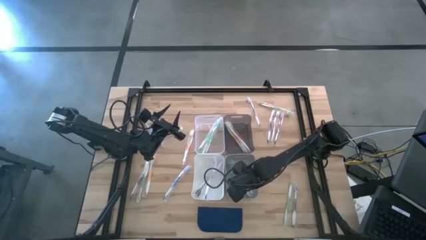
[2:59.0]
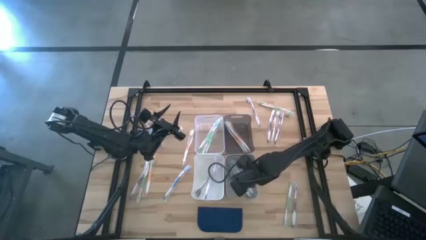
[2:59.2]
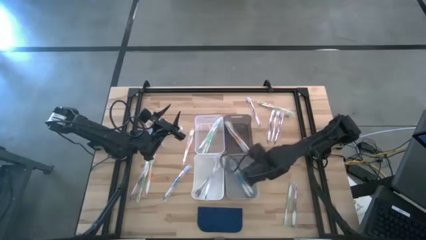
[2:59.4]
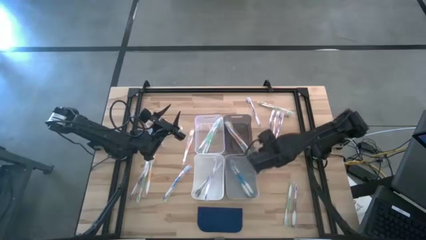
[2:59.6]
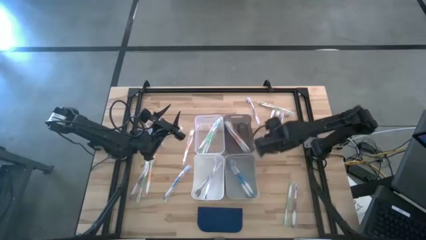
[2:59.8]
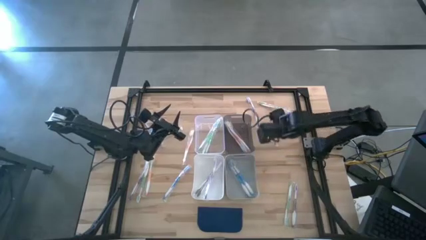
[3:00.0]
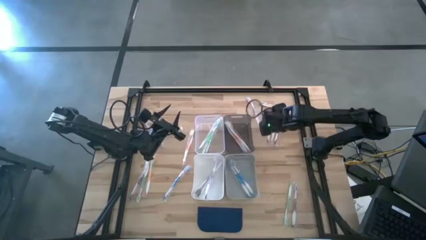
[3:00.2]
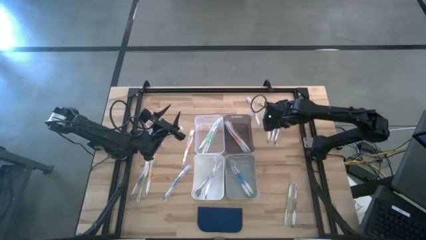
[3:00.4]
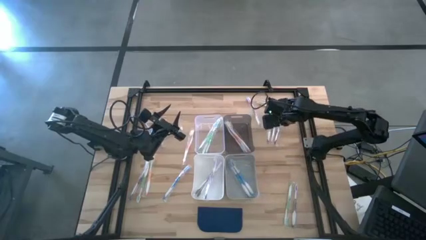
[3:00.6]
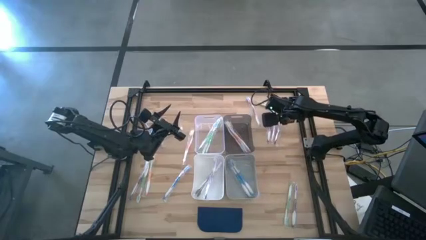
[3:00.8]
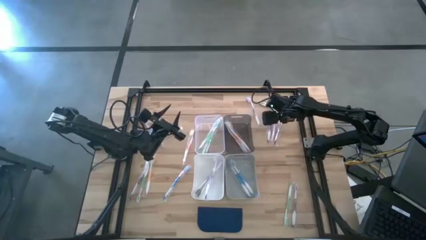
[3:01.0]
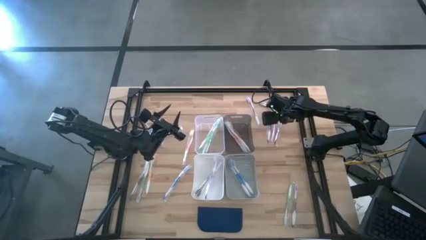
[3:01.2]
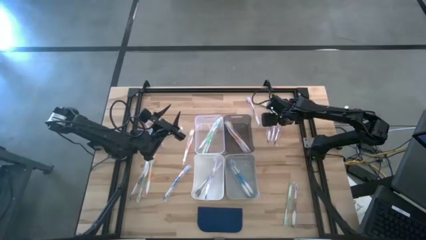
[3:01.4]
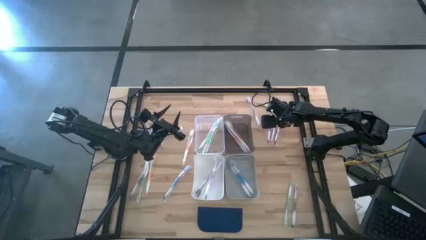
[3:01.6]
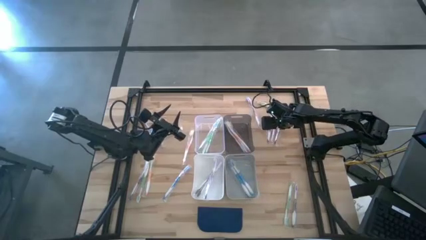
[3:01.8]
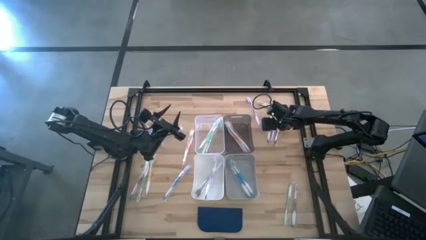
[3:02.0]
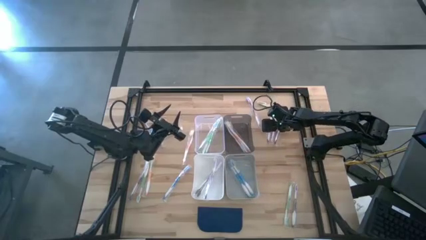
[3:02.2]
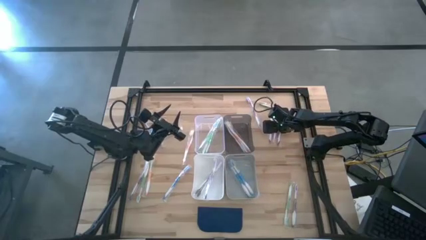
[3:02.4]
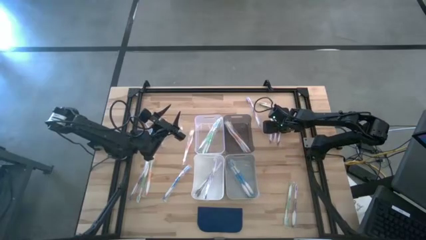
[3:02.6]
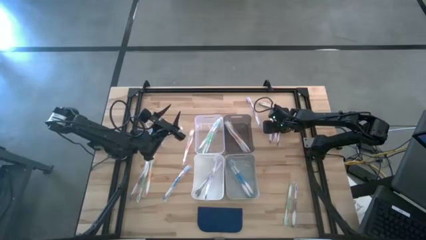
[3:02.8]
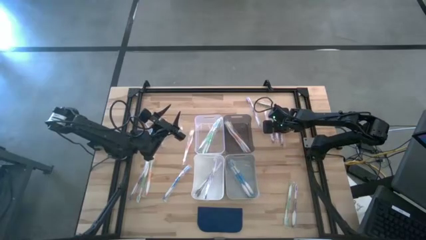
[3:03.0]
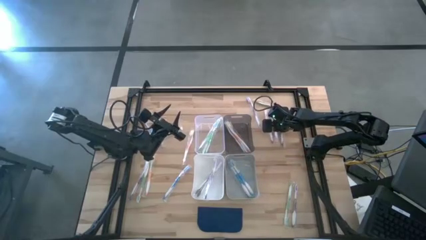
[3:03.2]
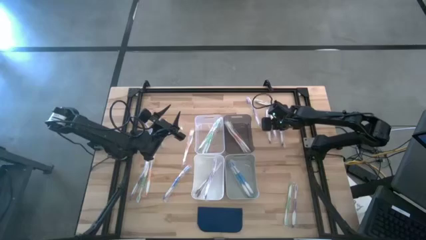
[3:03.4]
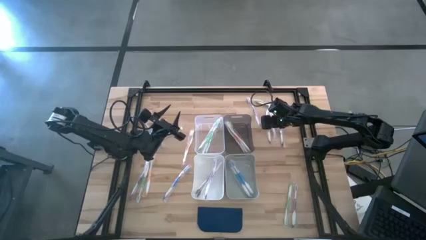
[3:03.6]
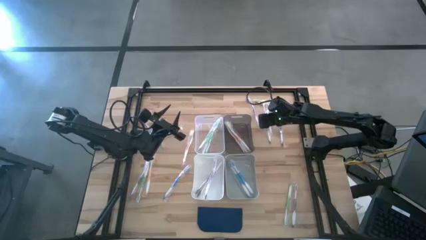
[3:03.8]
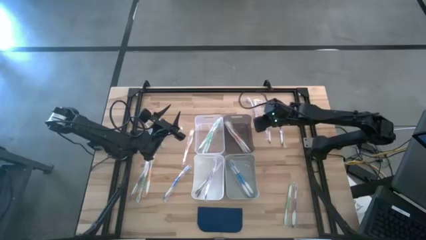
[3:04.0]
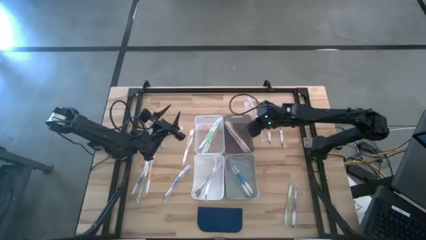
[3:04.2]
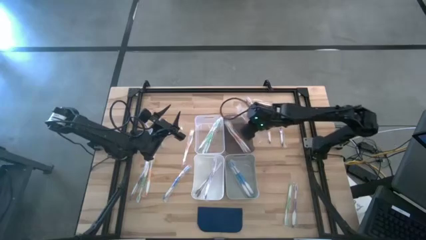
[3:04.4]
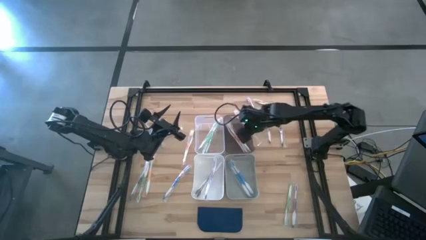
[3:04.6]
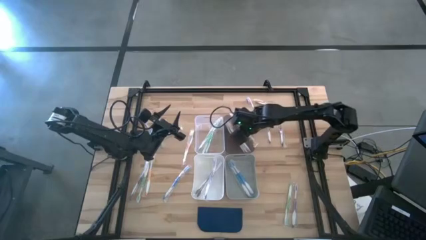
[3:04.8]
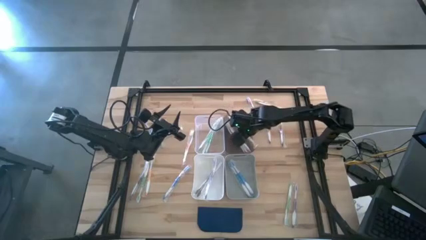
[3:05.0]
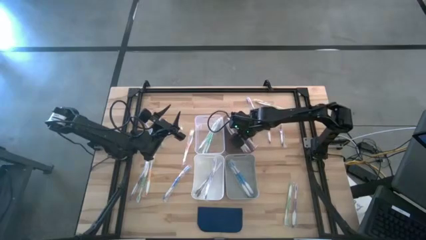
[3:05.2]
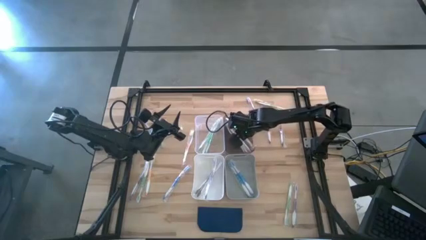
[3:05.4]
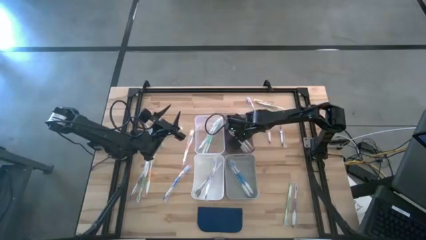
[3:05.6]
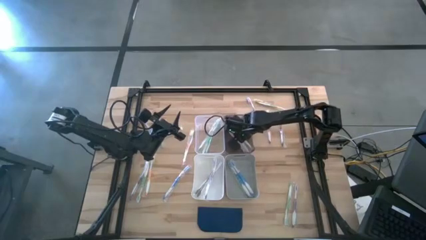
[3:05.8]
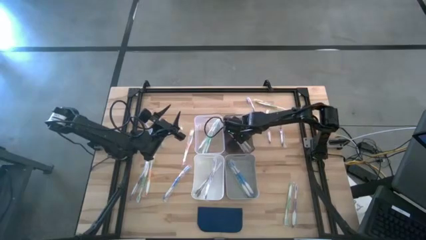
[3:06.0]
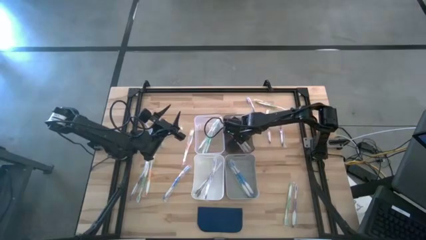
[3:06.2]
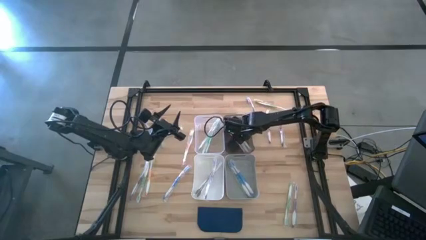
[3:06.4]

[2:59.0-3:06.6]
Task: Pick & Place Toothbrushes
Put the orange toothbrush into the black bin

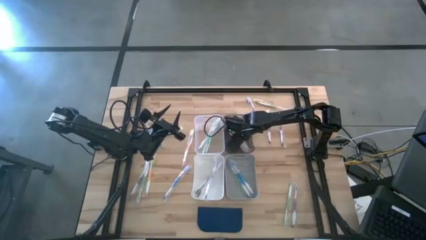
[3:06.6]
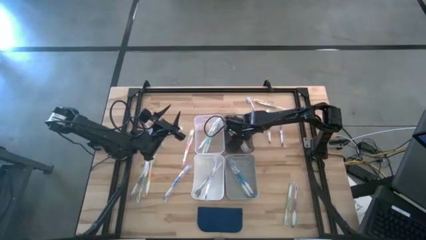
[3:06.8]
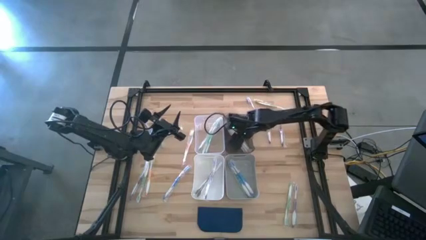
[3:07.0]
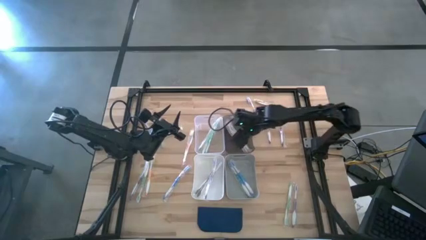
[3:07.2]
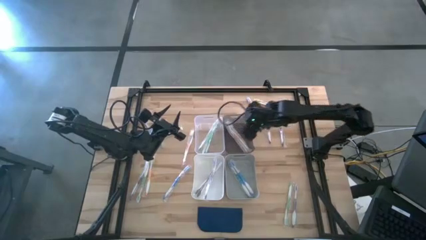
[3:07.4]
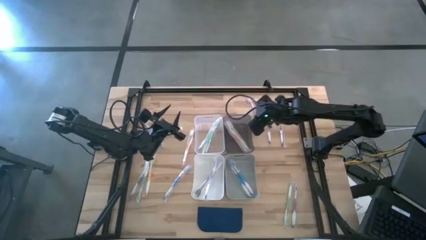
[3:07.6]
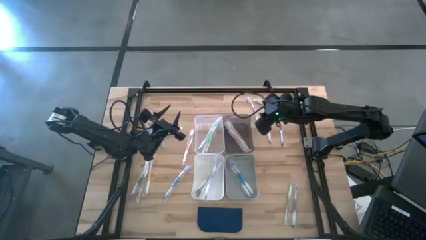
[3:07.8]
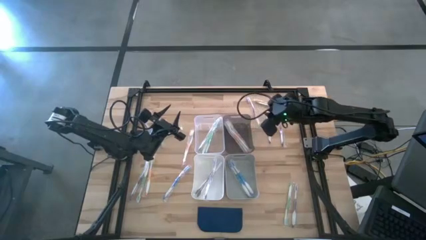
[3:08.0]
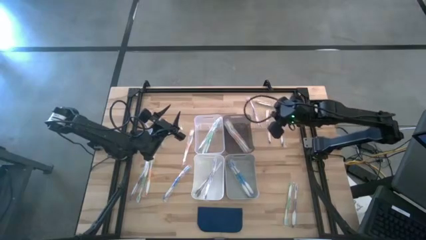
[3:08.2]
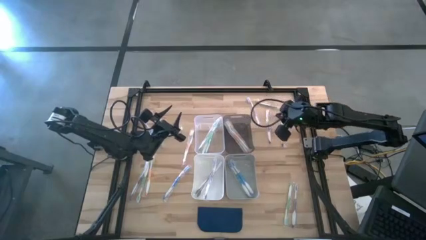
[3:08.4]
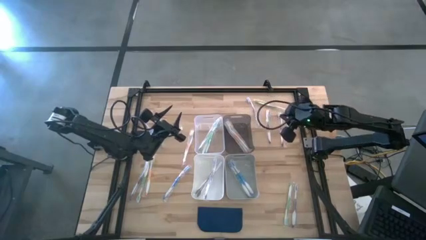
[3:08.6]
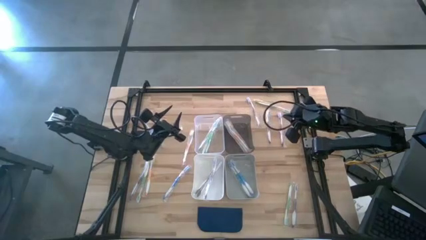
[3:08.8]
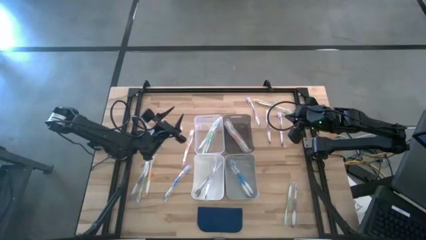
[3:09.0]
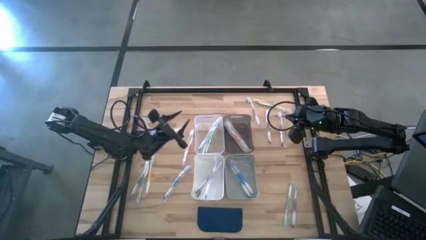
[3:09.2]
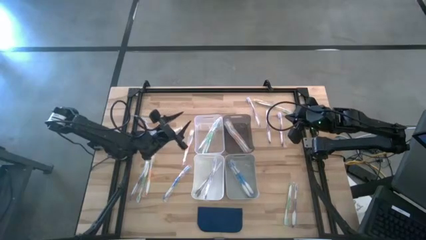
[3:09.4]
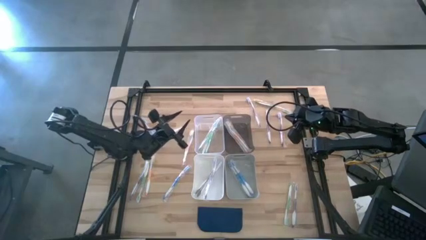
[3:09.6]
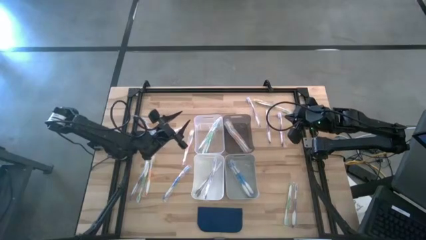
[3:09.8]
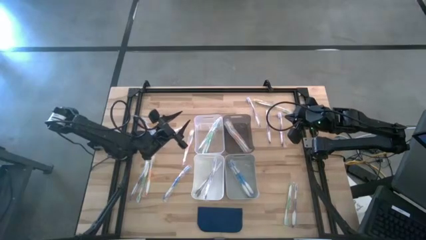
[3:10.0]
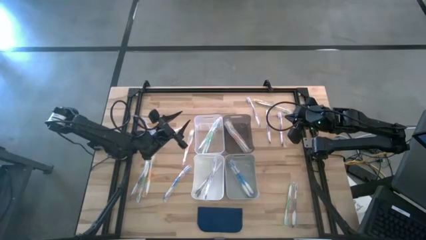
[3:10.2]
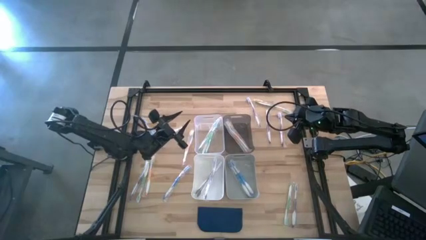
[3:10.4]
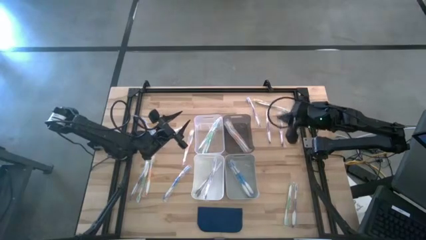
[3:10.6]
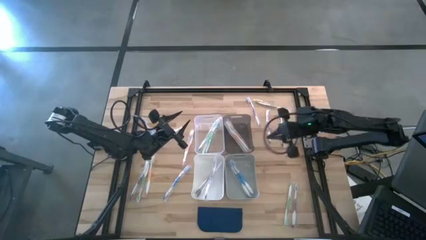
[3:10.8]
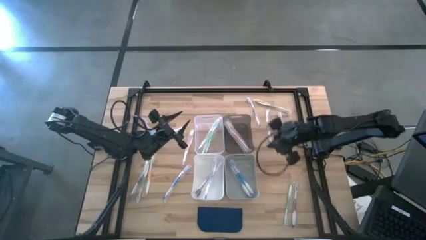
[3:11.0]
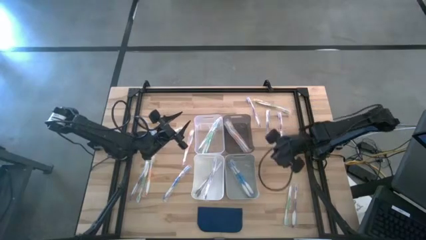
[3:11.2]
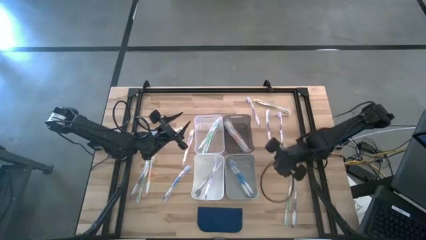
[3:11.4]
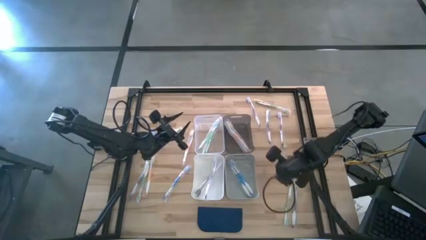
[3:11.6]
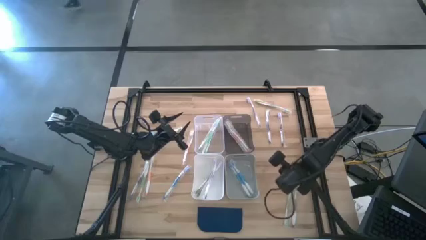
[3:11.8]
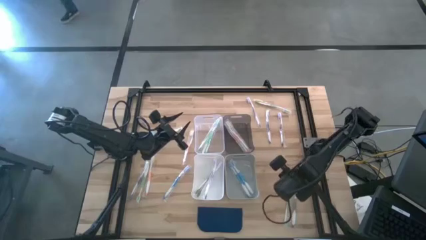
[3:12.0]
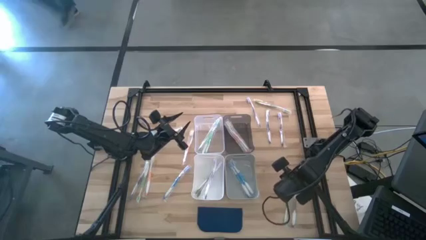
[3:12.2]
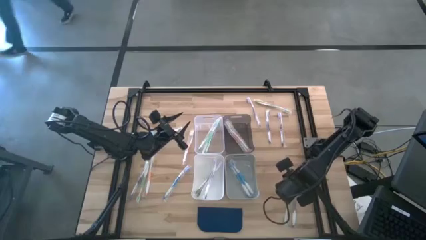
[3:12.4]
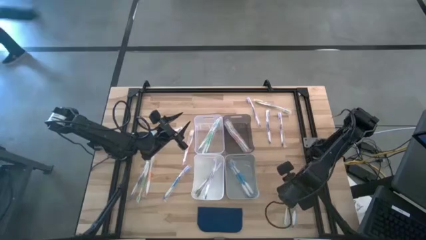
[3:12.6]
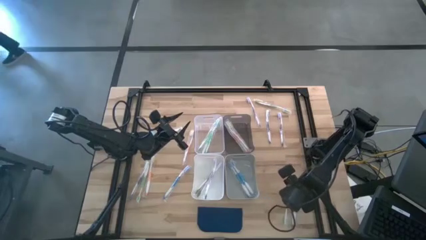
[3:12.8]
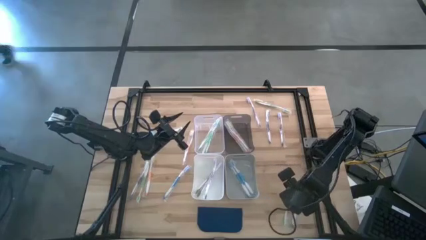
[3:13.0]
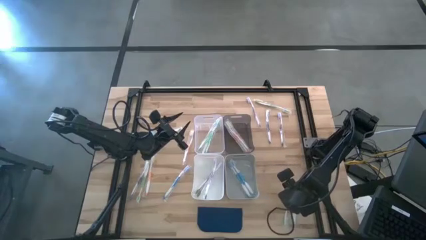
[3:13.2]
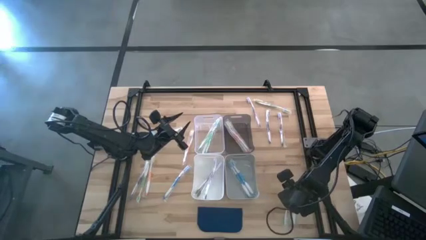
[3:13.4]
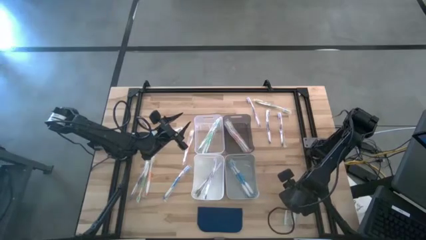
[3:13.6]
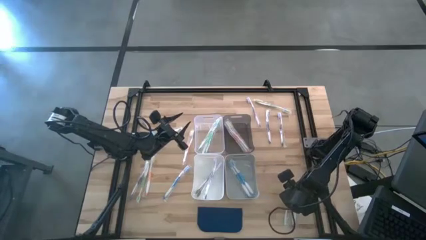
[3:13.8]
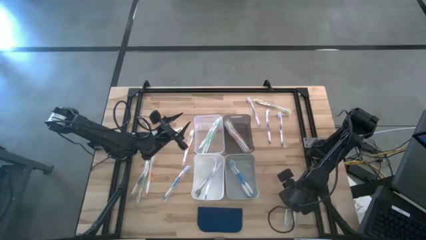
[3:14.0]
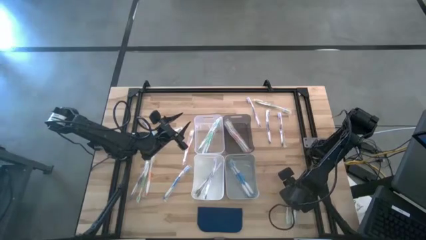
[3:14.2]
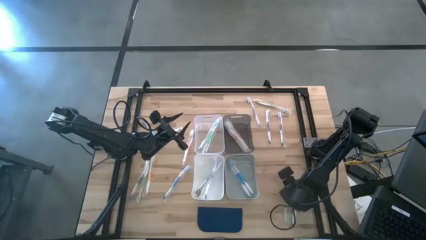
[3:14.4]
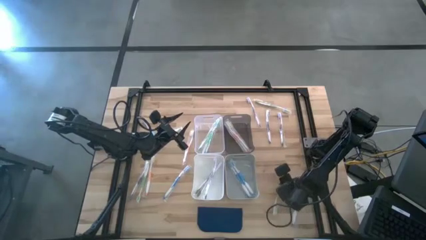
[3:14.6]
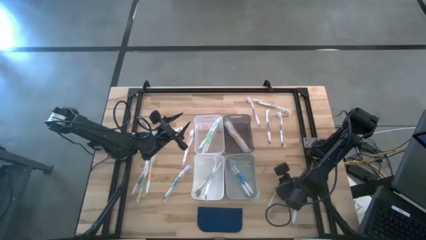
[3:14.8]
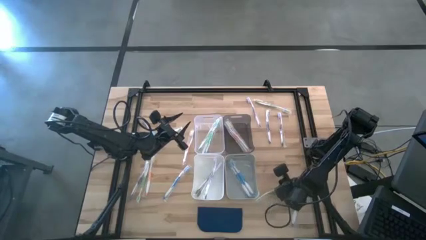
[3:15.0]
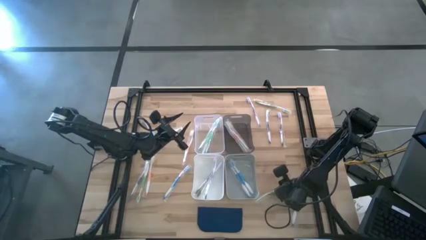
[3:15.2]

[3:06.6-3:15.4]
Put the green toothbrush into the transparent bin

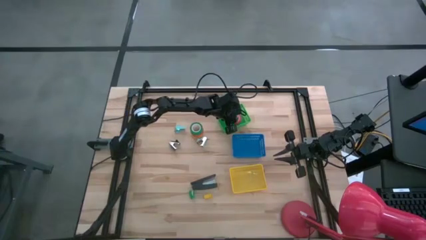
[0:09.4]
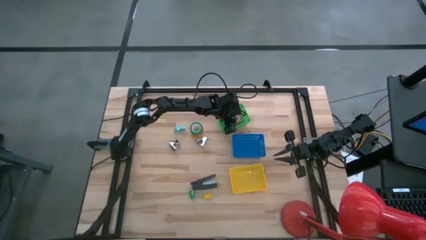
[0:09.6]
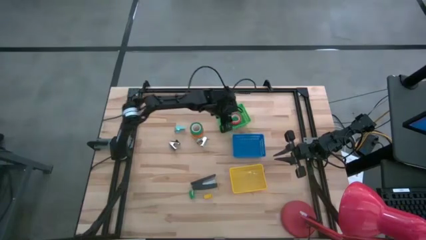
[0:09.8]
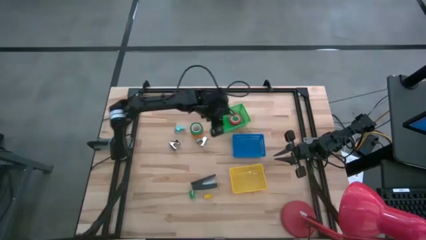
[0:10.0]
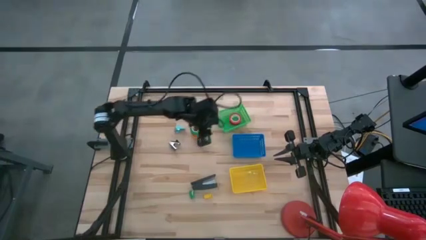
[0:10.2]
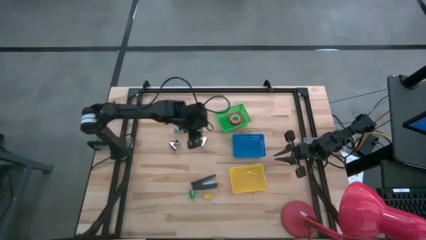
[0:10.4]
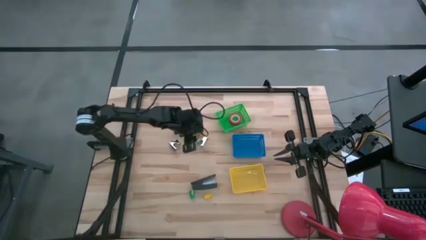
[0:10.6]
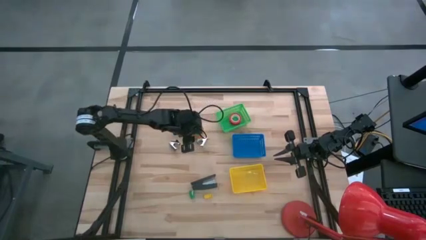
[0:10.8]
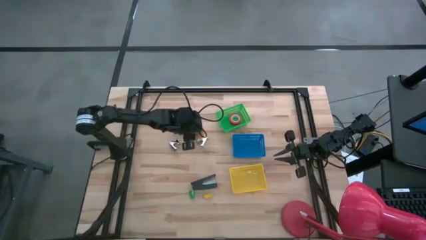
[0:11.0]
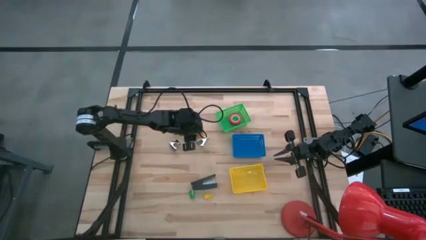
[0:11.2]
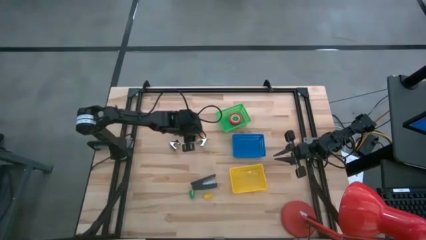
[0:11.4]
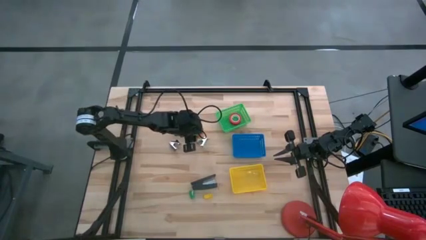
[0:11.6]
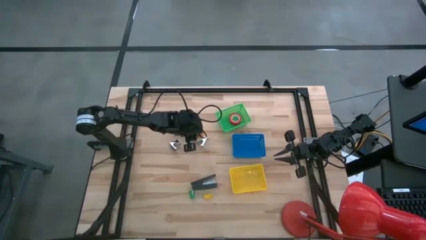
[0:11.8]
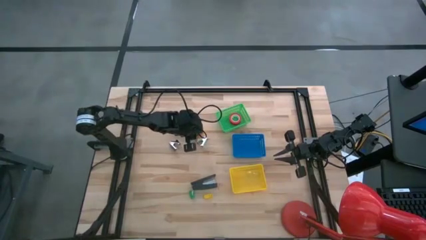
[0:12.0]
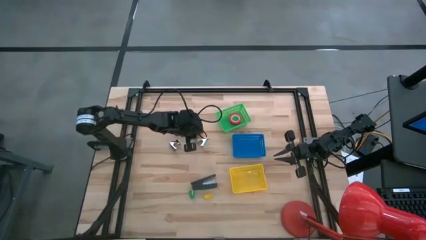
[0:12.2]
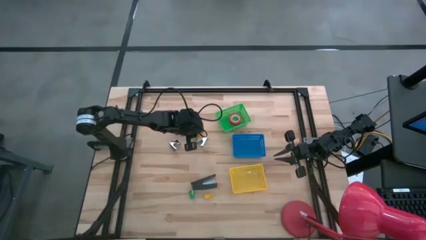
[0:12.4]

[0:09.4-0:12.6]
Task: Pick and place Stapler, Stapler remover, tape
Put the green tape into the red bin
